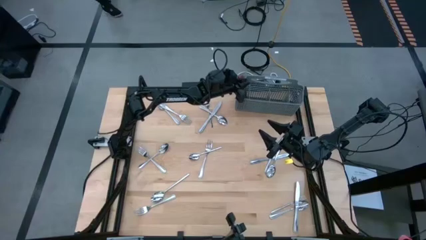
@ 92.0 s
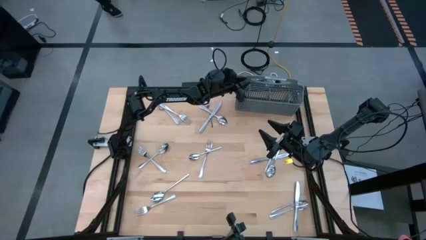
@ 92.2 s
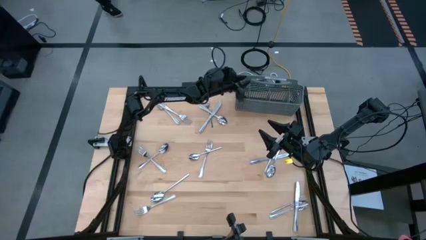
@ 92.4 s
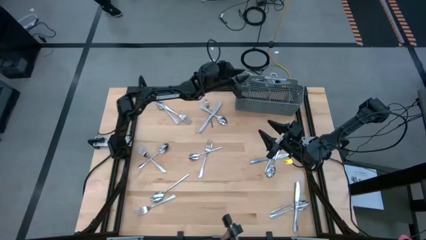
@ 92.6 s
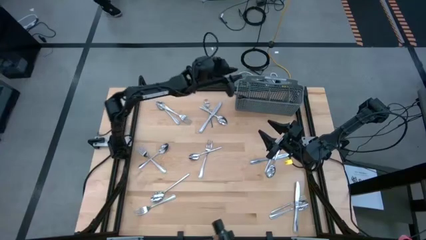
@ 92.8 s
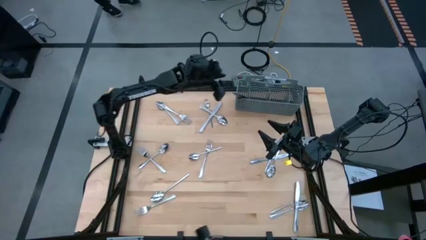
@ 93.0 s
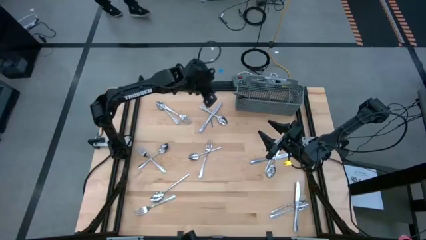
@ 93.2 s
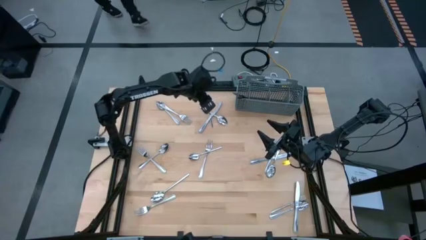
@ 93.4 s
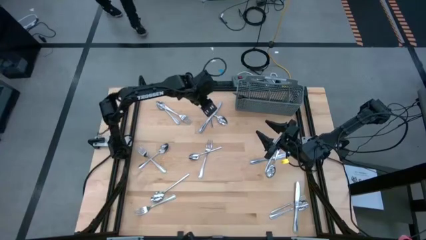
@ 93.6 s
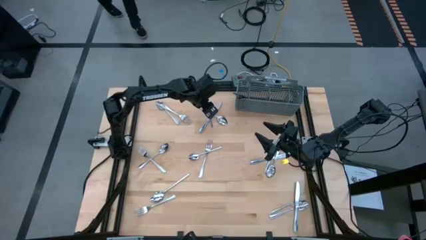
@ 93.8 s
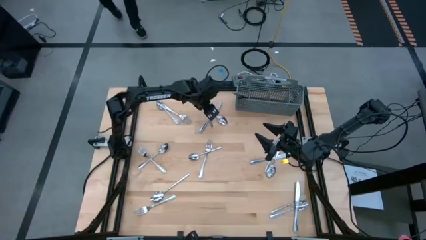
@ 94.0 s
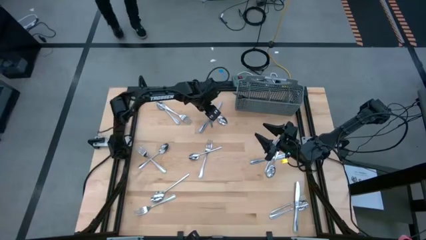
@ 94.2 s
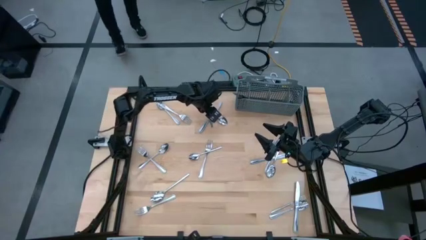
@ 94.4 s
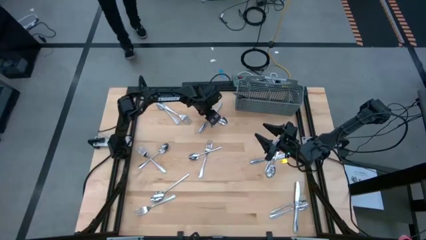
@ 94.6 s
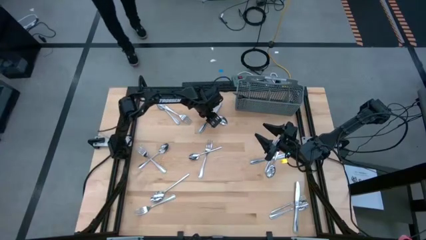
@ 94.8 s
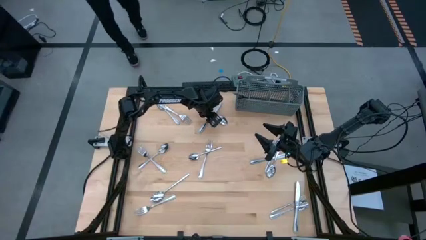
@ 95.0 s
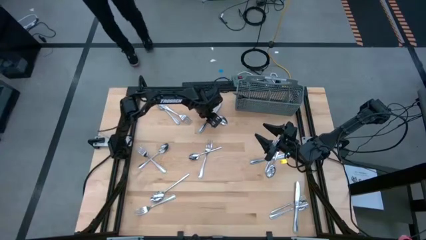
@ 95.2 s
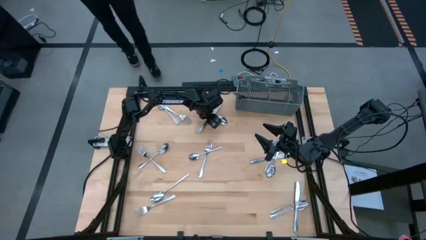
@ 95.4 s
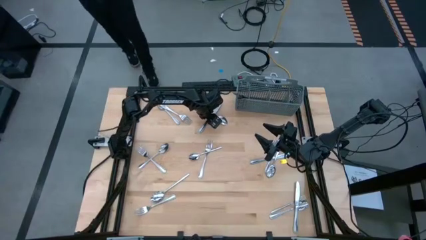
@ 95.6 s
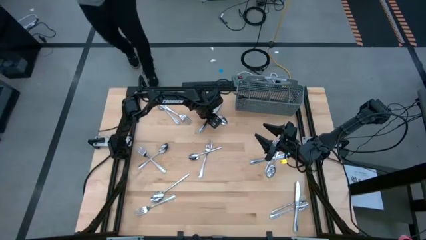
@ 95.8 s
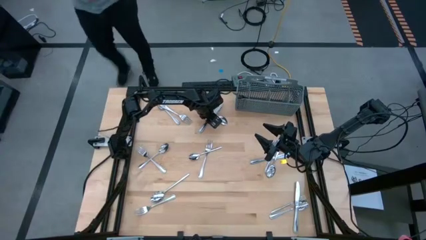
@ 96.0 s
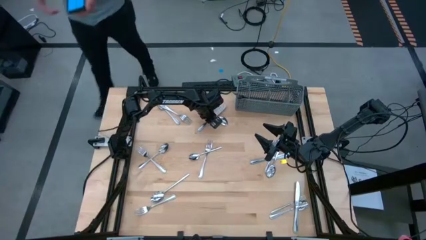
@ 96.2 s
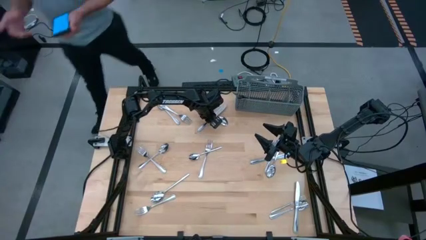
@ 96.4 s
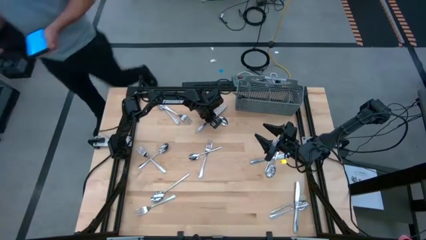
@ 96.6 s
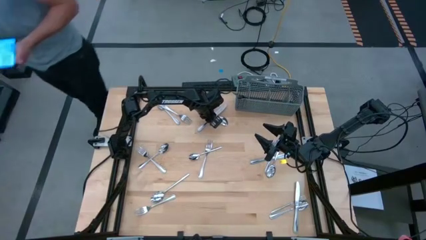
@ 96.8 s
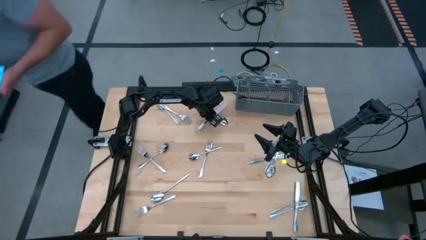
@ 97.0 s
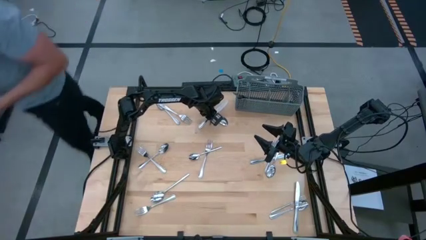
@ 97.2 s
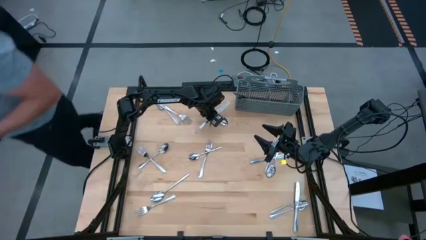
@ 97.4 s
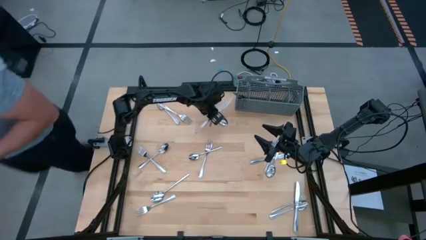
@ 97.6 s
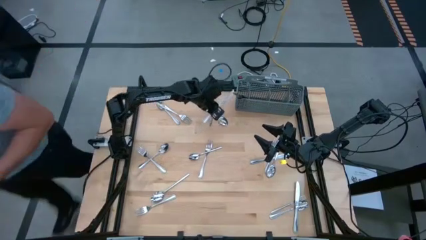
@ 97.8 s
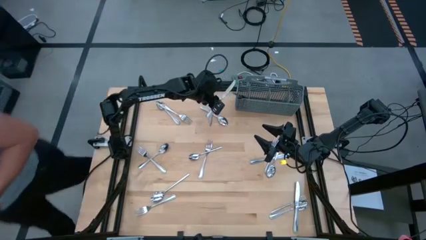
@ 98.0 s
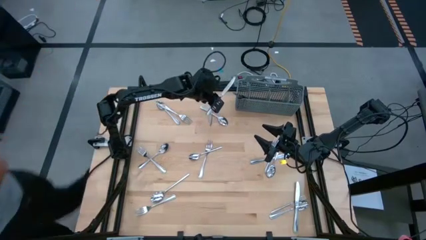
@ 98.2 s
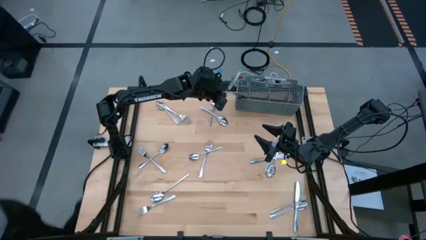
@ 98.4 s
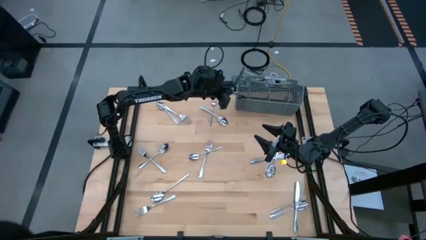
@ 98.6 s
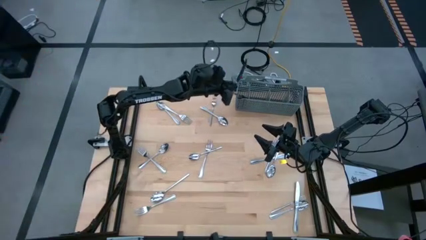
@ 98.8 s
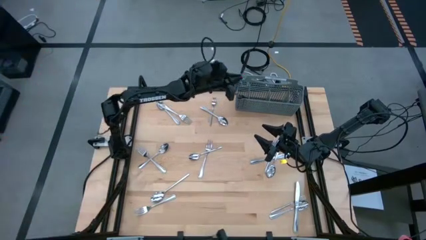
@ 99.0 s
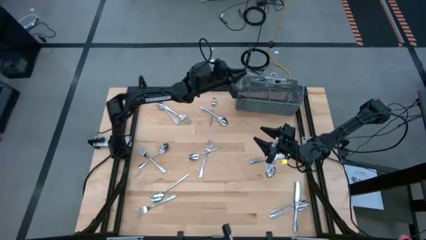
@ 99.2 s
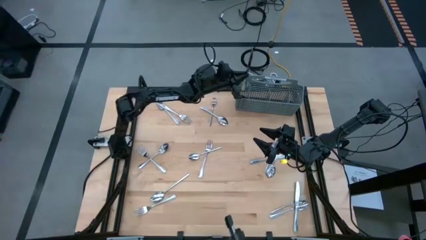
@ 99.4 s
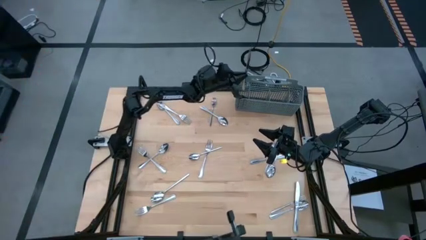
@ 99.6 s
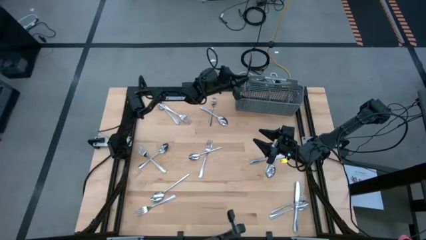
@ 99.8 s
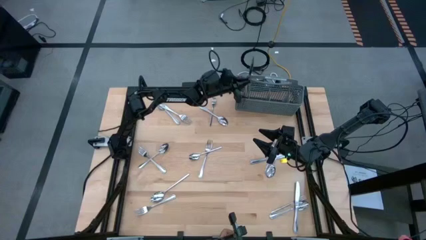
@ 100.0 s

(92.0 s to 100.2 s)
Task: Sort silverware
Put the silver knife into the silverware basket

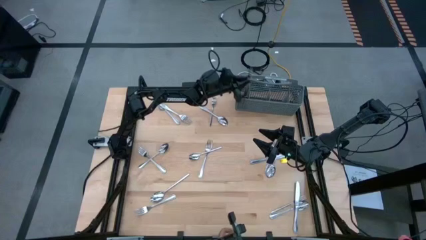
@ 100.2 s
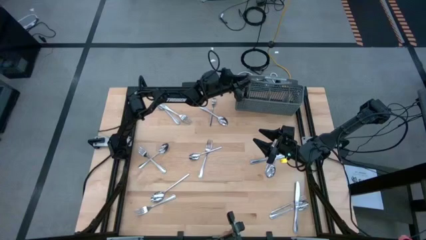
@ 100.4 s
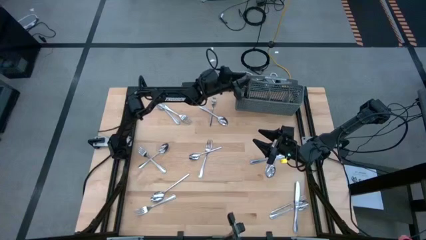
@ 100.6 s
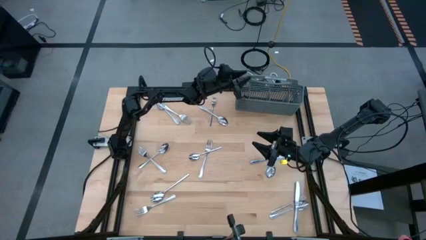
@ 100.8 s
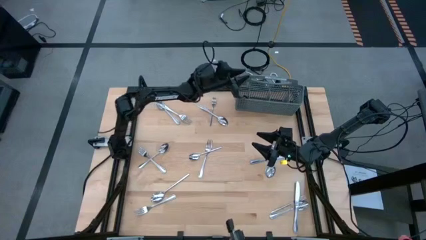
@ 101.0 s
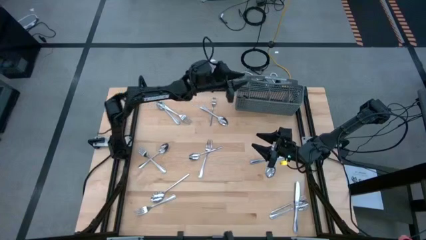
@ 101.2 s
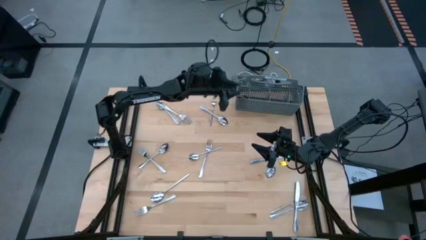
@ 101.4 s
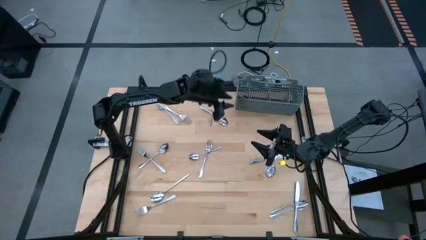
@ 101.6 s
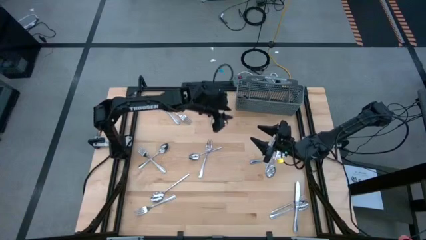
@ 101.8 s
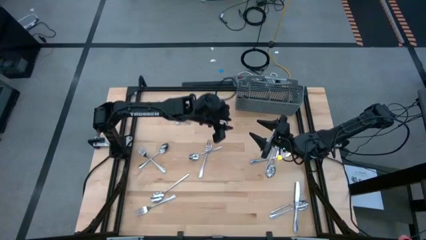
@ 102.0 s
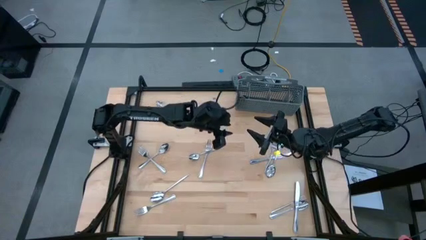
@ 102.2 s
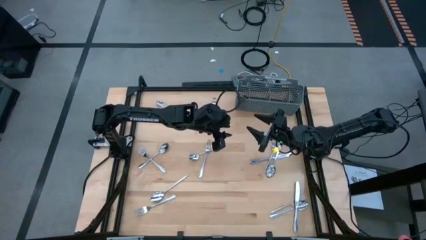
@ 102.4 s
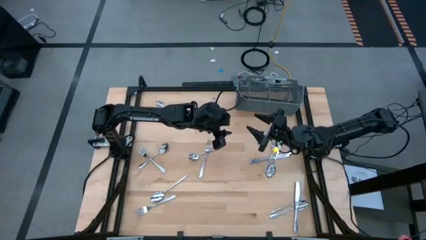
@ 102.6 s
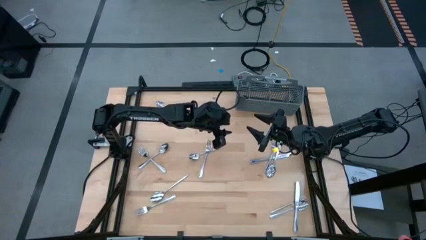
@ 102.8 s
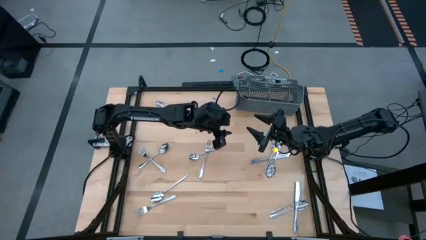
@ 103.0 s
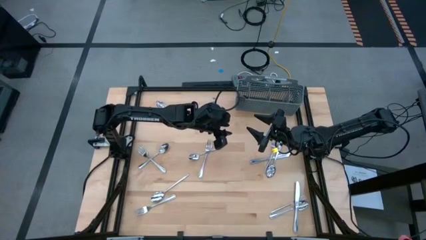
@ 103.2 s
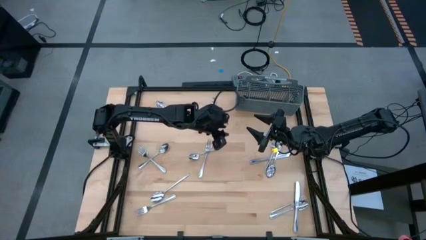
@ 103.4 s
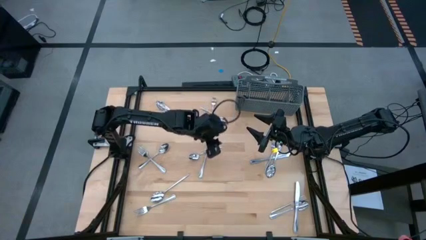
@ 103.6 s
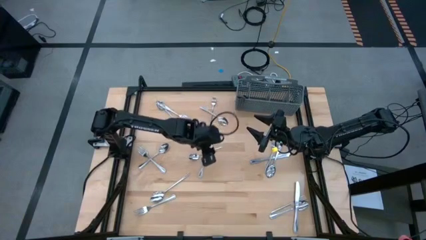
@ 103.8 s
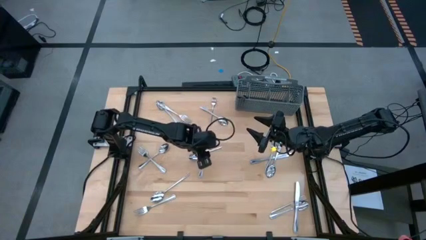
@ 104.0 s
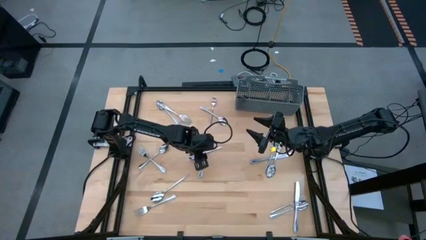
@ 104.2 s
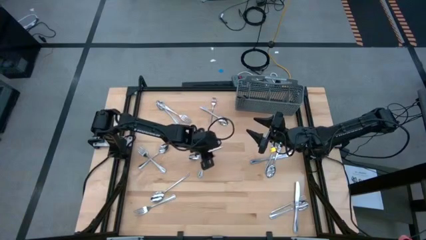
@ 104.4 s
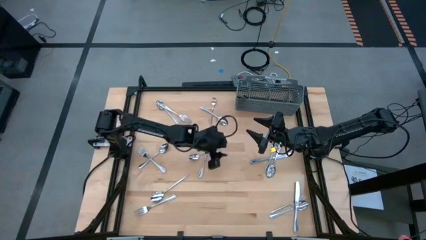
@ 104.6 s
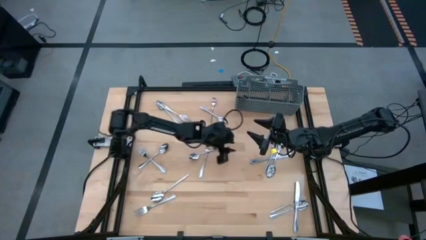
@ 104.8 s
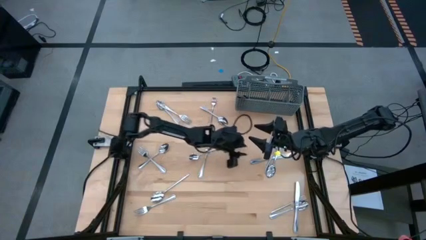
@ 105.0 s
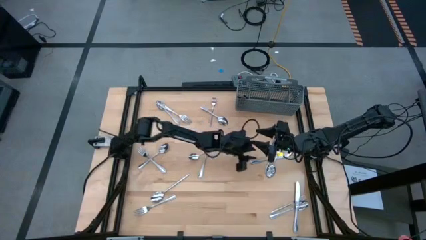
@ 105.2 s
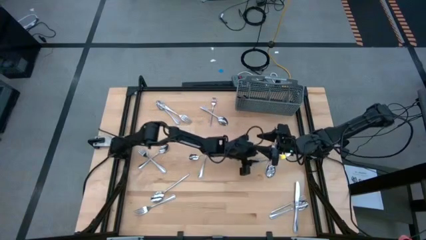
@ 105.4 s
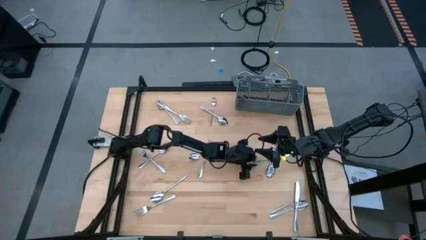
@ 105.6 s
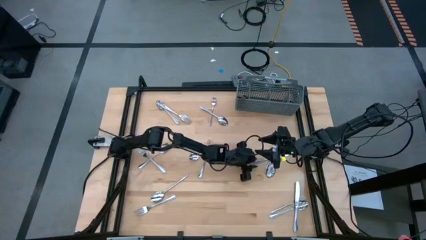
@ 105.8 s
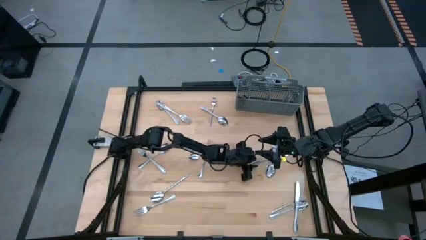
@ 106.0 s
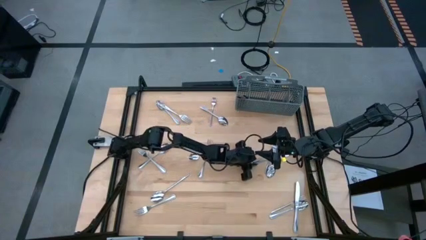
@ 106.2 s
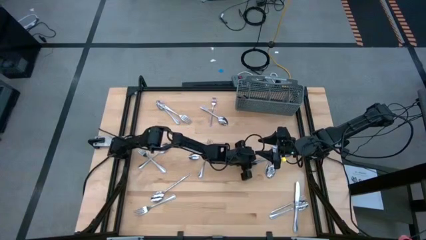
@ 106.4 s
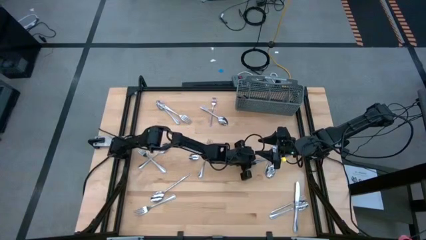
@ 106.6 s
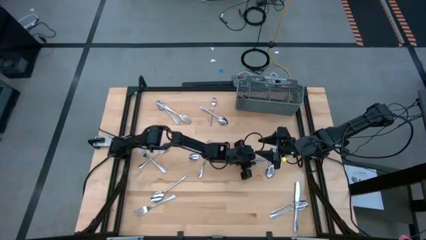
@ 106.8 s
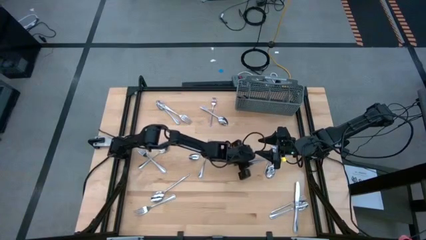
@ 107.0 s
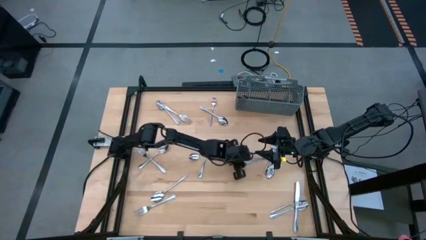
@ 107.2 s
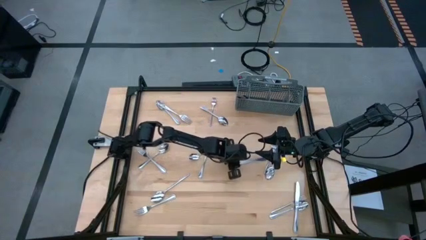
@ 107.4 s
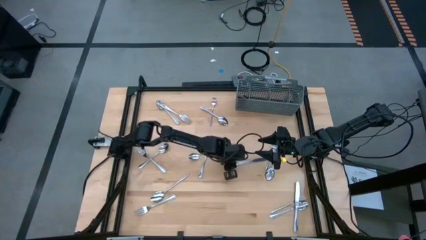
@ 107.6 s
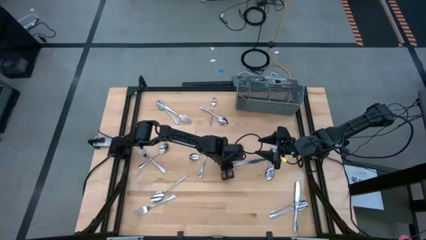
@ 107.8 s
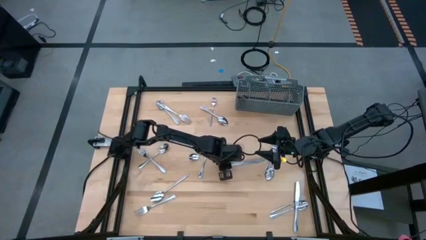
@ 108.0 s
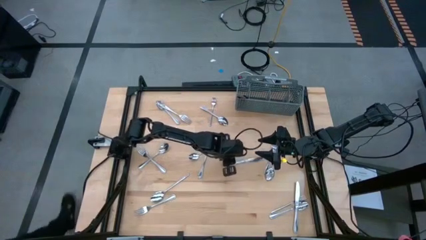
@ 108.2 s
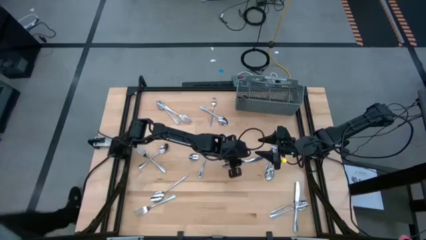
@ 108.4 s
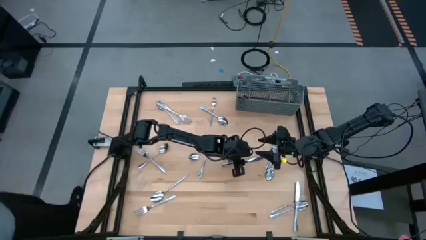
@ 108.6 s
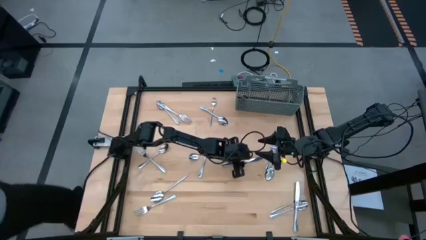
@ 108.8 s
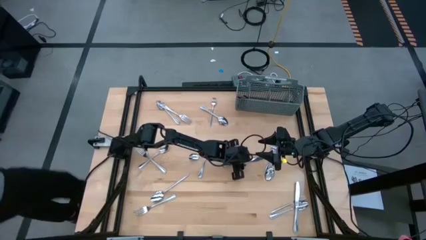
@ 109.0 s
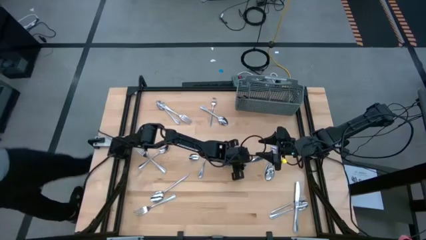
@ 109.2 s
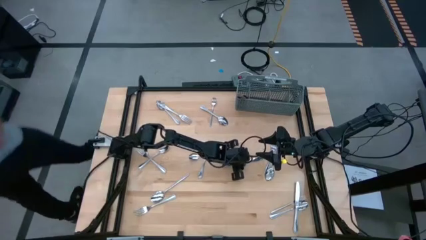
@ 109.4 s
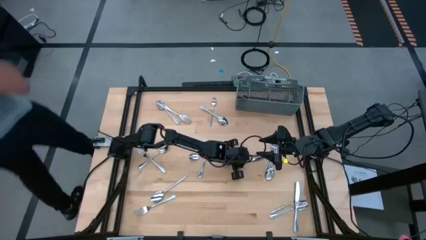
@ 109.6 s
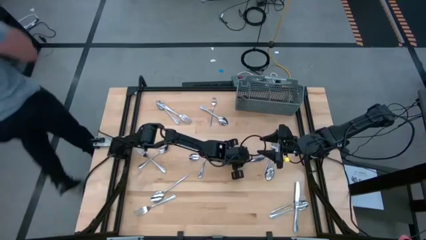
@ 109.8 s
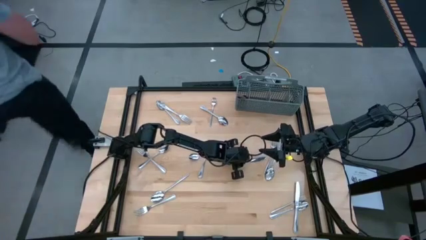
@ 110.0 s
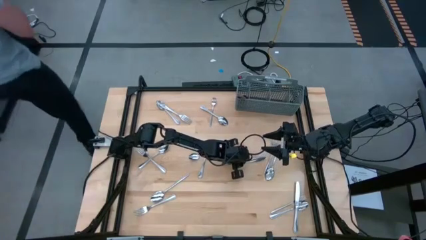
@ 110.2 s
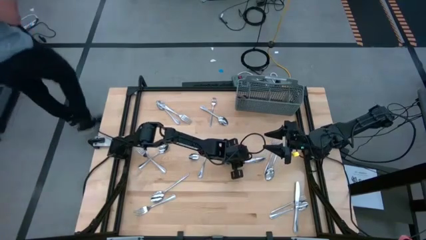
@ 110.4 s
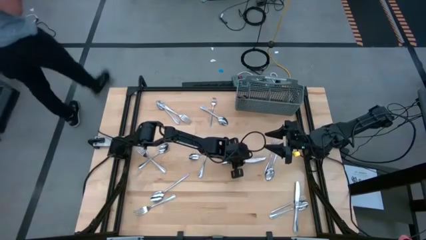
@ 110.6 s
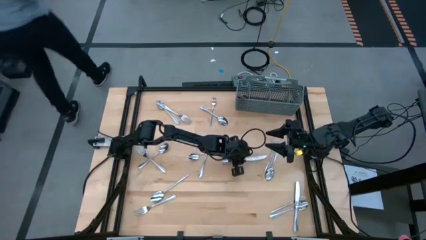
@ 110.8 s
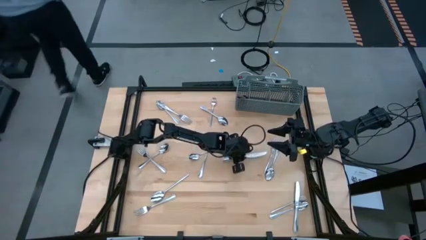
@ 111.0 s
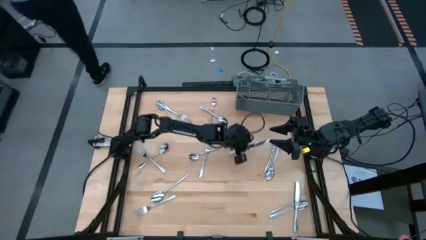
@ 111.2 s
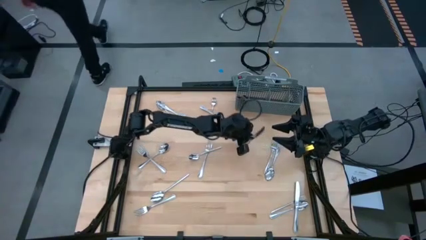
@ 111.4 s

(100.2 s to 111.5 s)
Put the silver knife into the silverware basket
